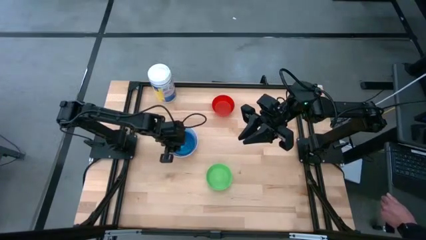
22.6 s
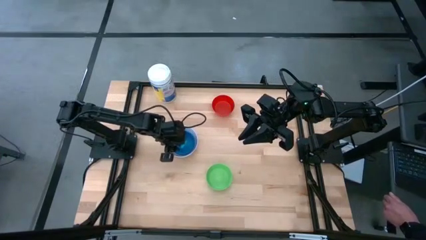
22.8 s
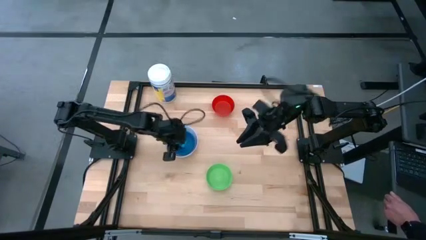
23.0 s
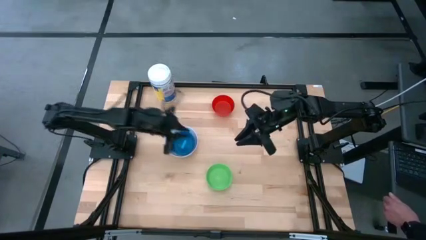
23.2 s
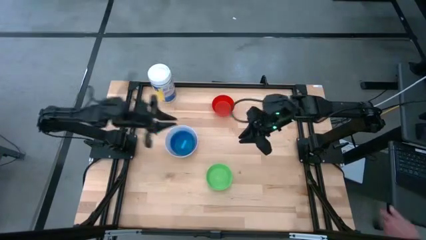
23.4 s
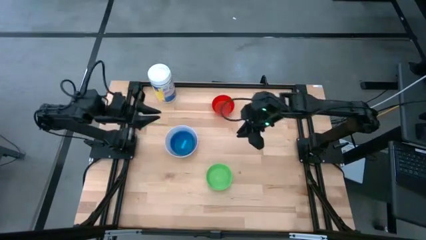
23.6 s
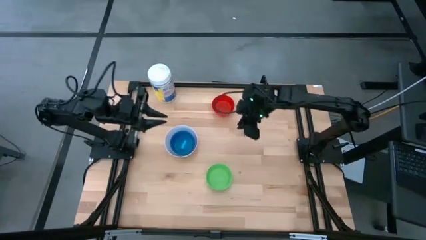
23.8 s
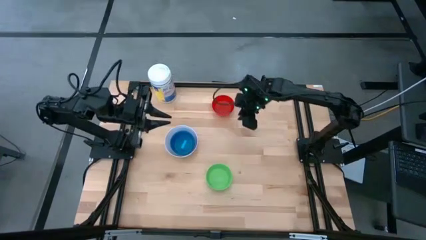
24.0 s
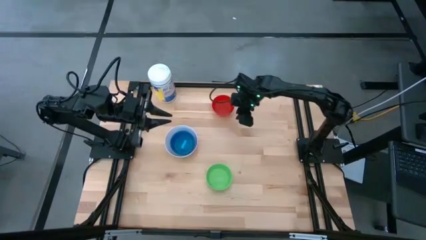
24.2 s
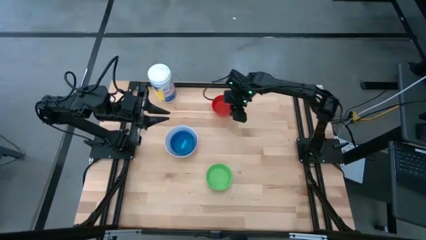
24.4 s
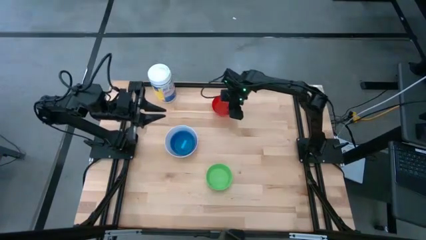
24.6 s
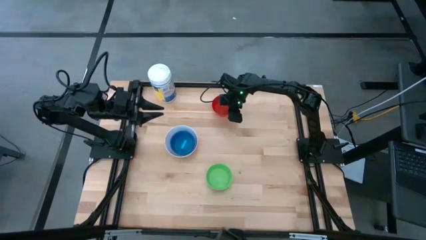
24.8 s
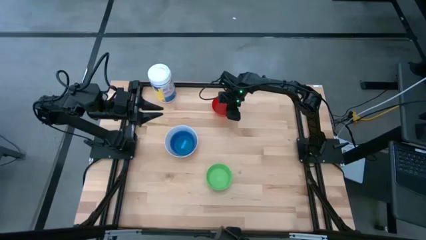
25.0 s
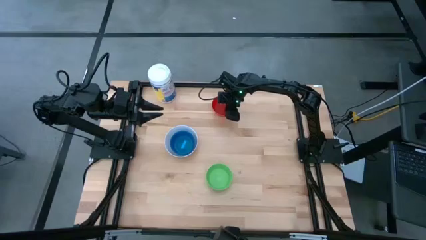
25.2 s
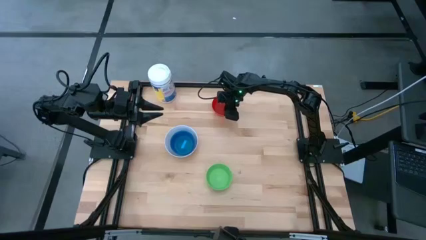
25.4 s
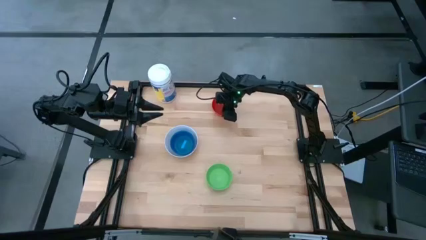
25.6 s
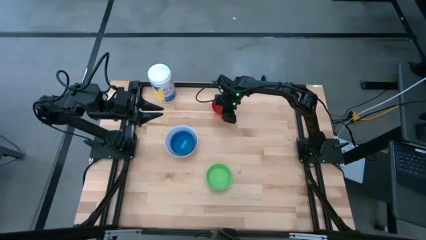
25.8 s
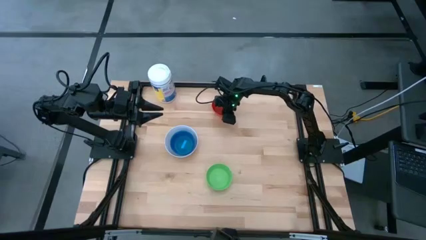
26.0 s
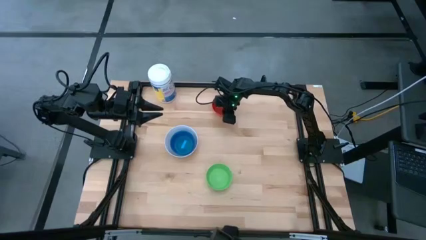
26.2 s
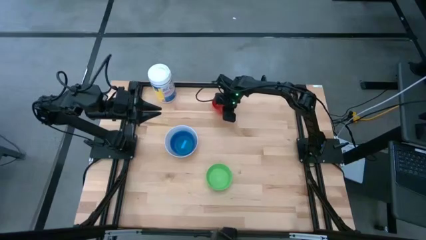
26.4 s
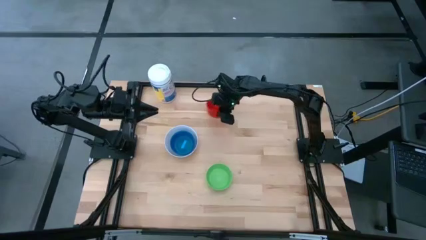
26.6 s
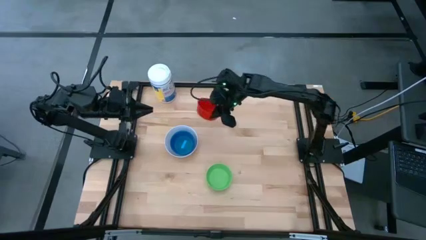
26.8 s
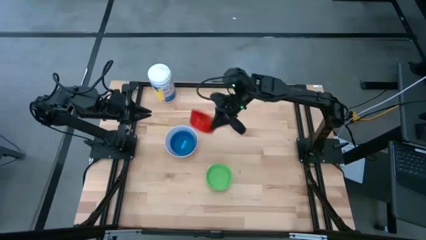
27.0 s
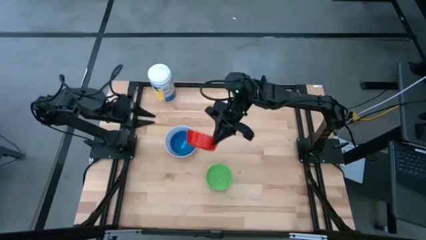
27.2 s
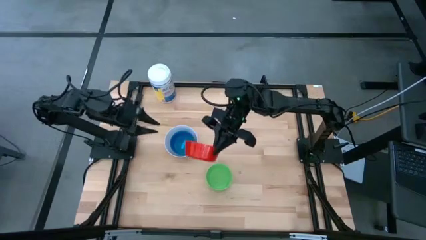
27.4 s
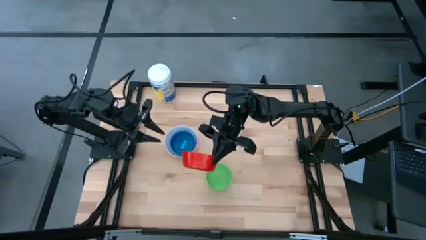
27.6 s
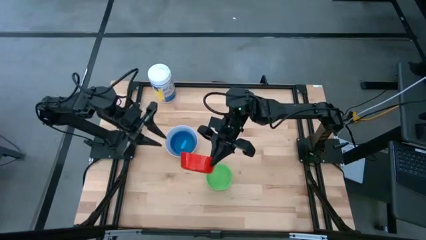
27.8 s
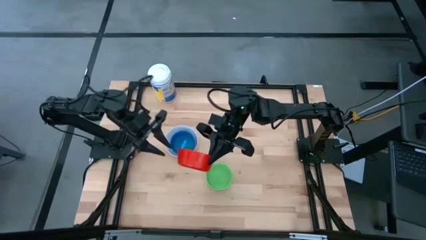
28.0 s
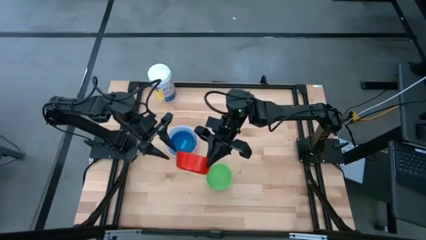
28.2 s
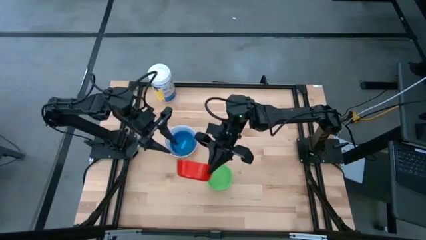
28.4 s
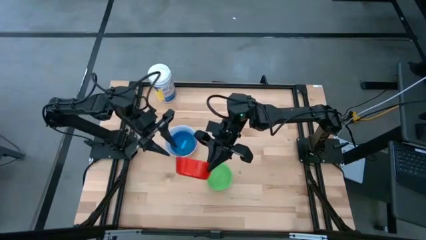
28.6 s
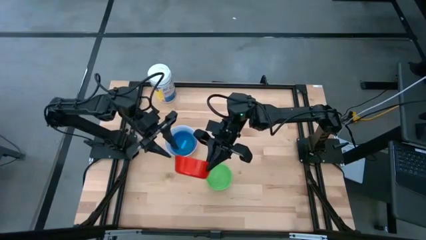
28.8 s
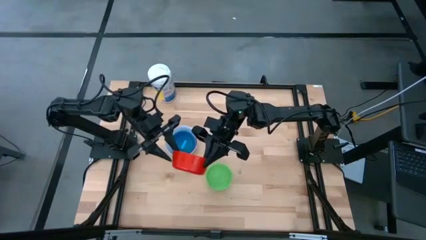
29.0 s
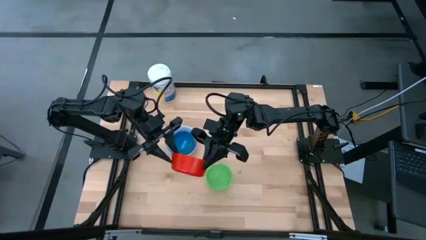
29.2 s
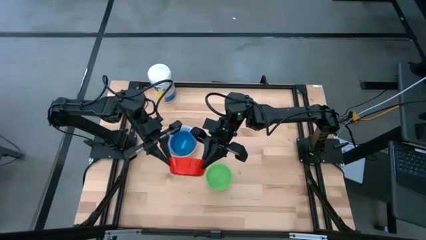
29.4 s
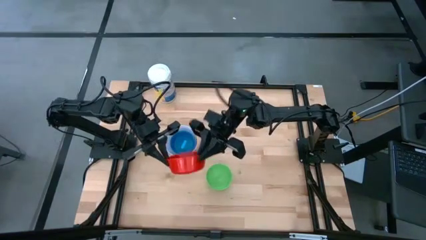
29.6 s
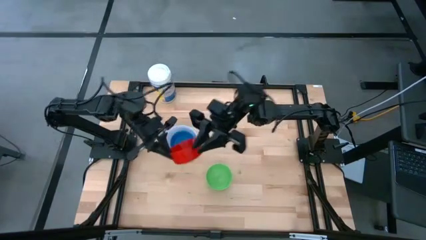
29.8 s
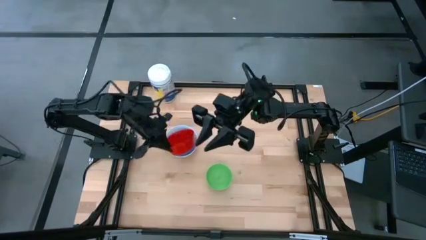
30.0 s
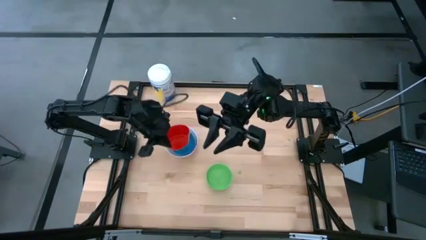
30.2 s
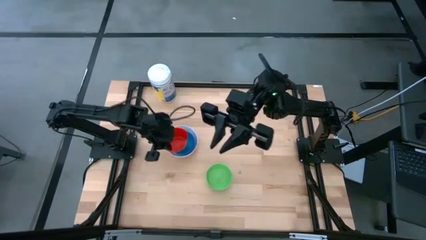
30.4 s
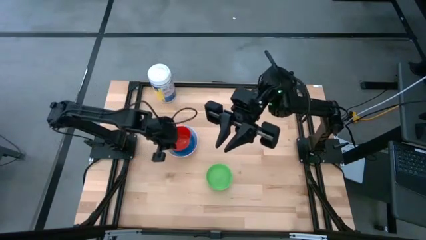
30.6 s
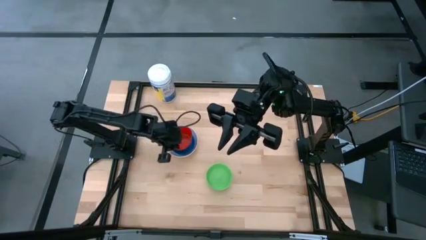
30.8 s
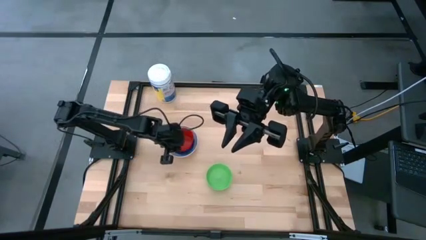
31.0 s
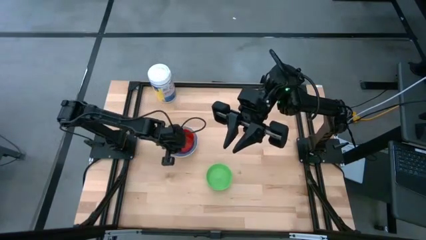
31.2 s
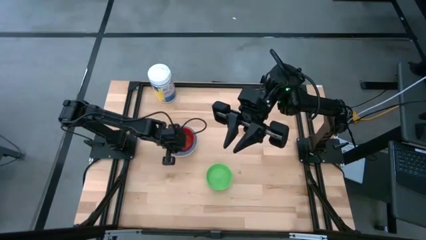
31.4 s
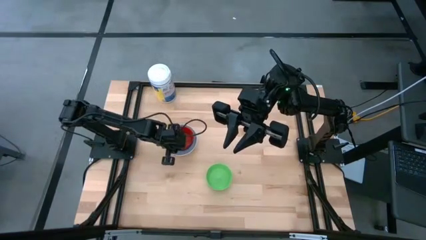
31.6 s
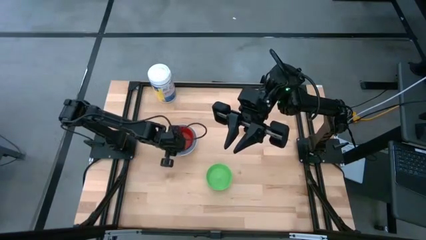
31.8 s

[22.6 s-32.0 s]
Stack the red bowl on the blue bowl

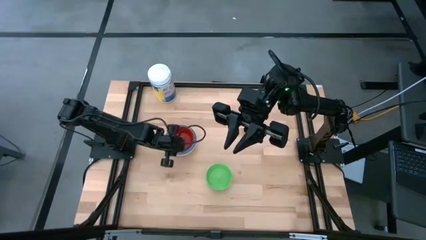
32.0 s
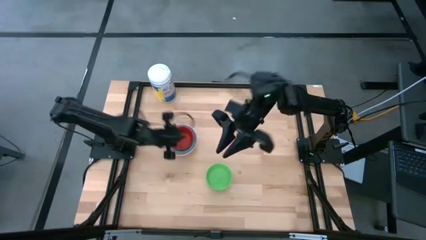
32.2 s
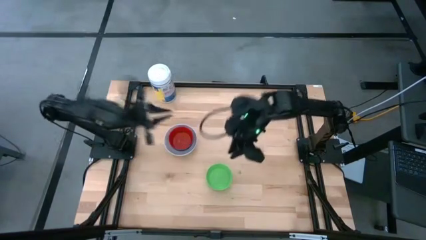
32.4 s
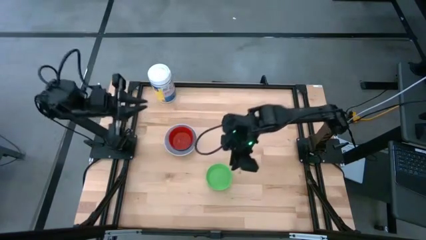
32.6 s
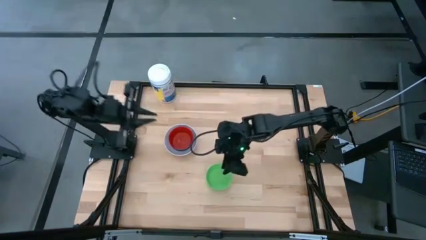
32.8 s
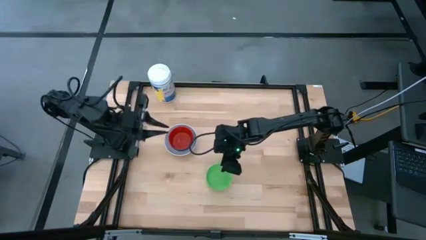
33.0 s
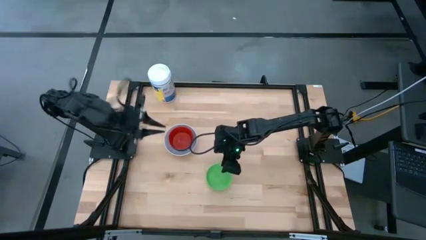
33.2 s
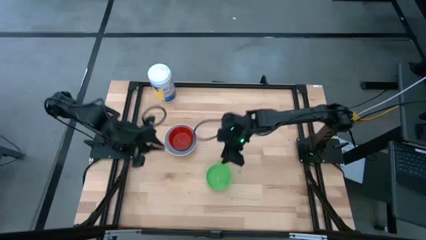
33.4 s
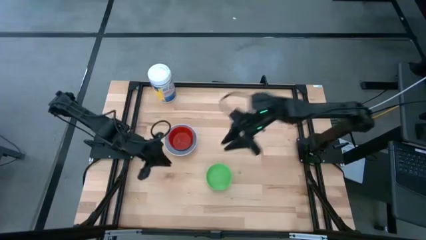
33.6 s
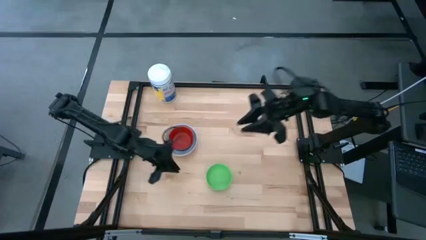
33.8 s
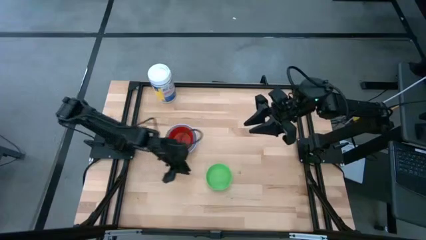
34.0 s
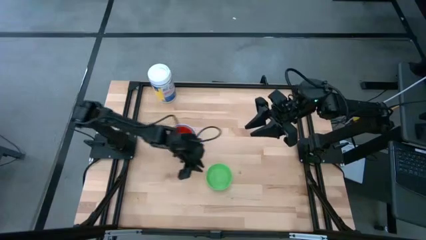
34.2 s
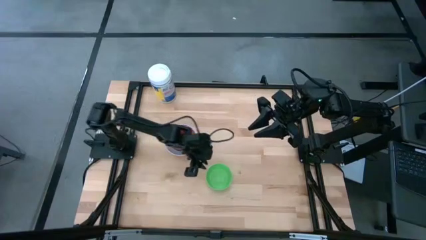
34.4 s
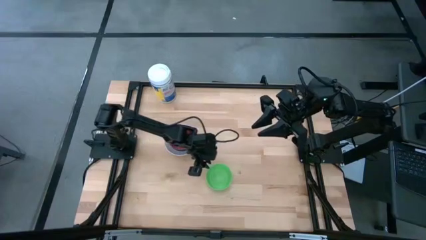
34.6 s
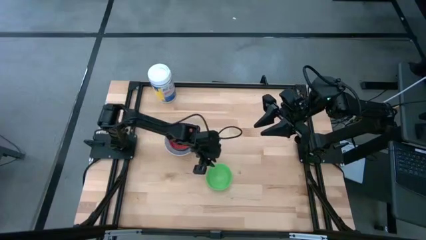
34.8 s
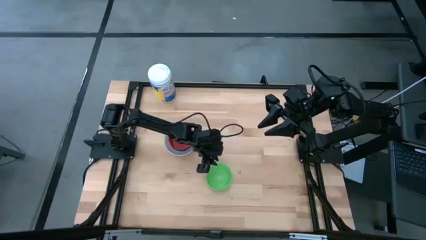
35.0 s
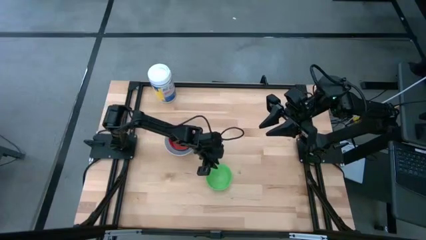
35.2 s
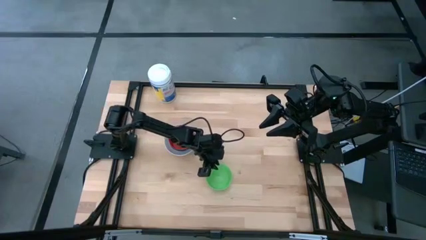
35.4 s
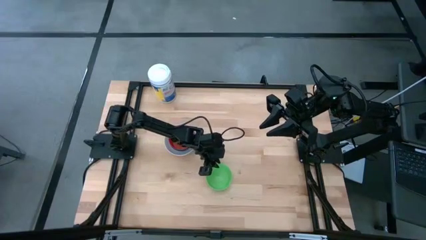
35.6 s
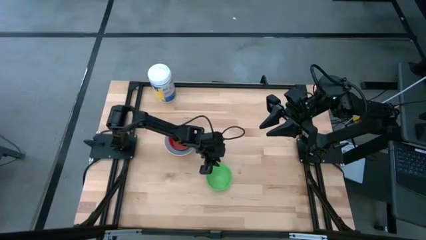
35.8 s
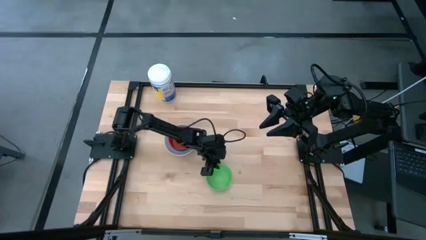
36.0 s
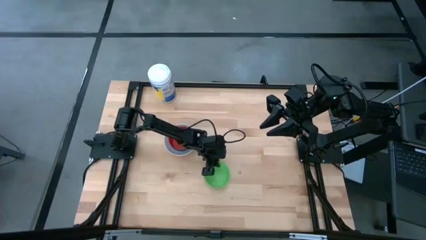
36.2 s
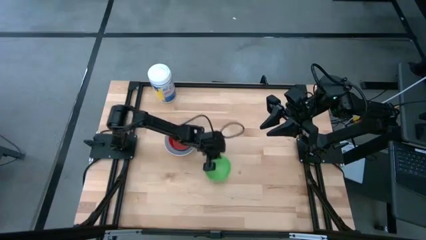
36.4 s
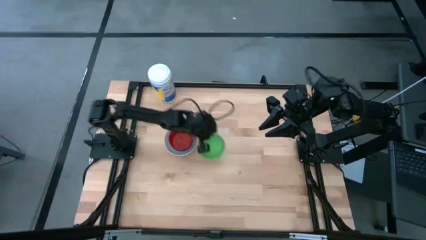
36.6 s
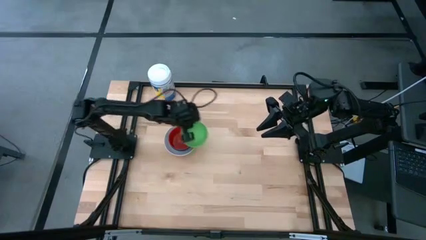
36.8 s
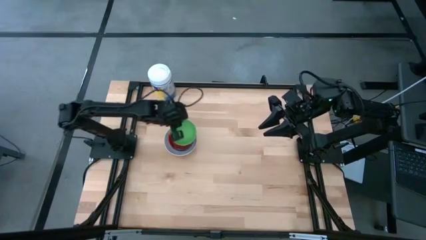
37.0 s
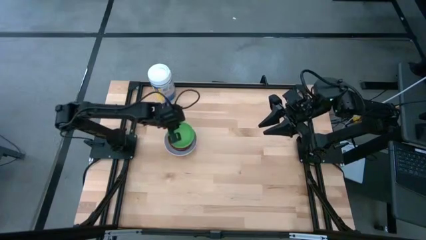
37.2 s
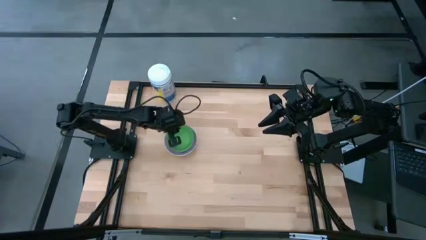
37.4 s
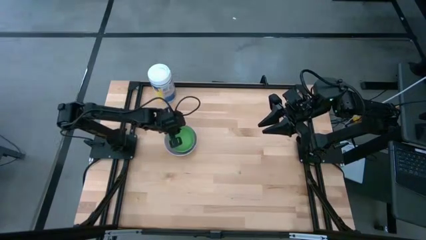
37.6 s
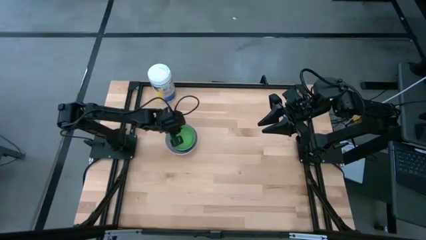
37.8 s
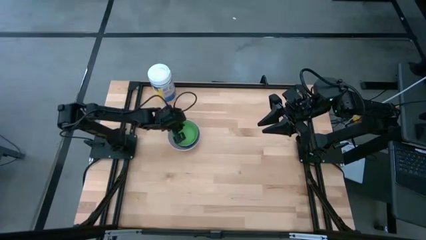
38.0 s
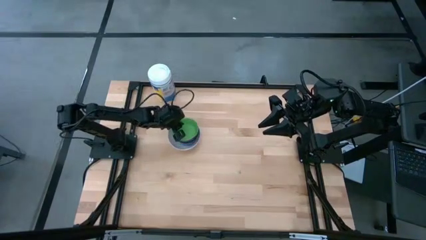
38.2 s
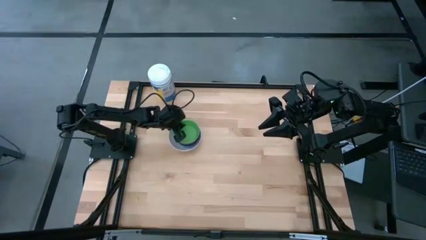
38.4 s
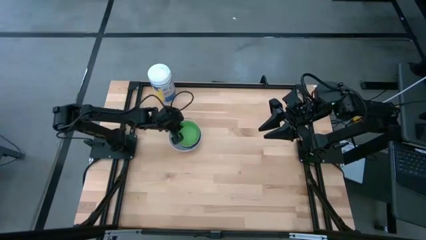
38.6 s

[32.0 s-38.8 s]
Stack the green bowl on the red bowl

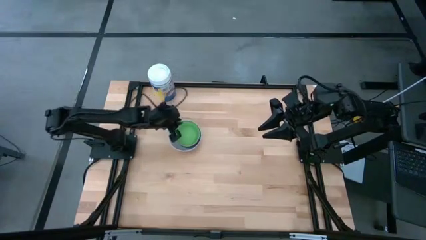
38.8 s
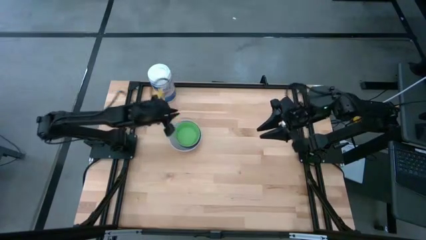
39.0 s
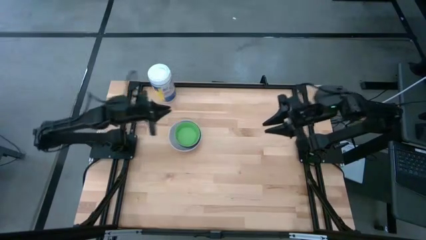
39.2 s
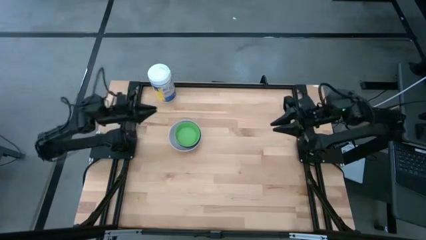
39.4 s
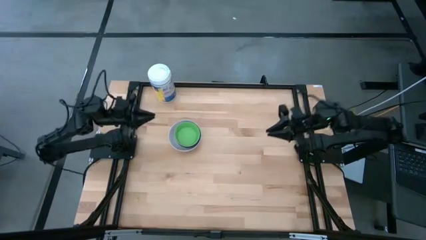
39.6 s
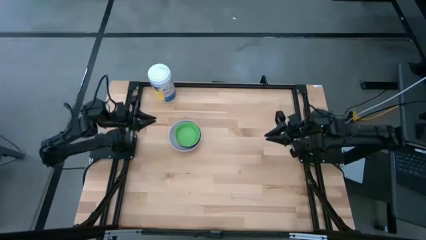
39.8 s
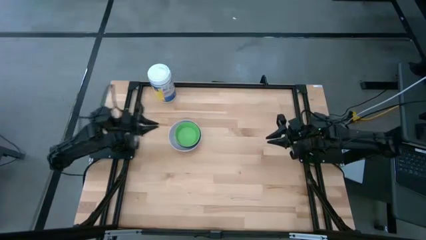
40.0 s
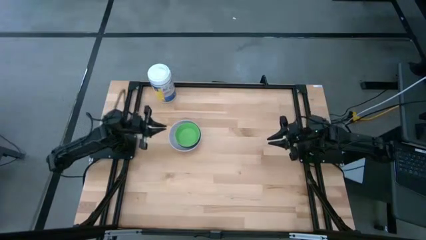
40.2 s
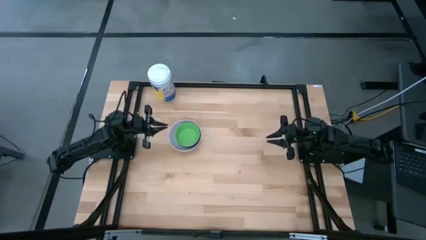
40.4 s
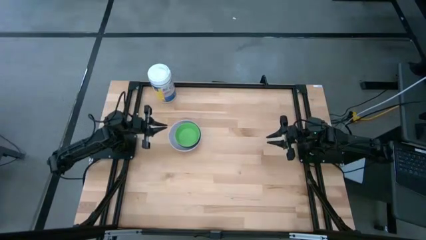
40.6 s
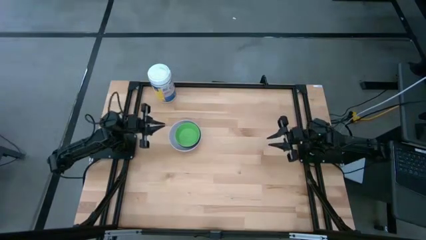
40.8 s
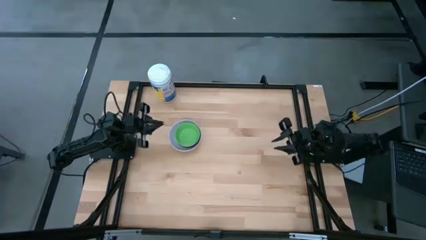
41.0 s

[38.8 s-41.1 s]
Return to Home Position
